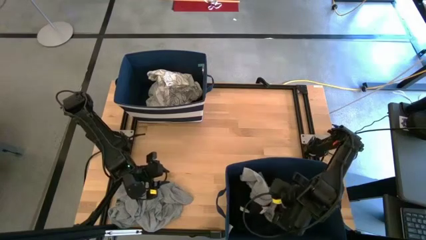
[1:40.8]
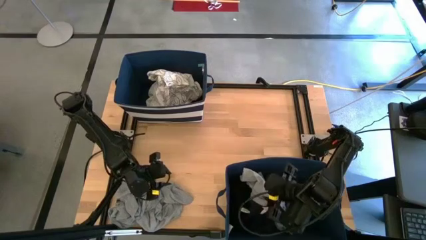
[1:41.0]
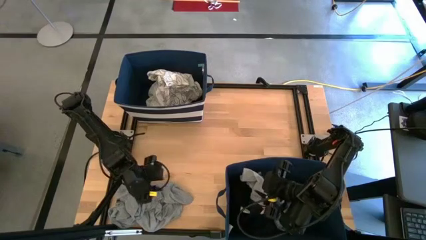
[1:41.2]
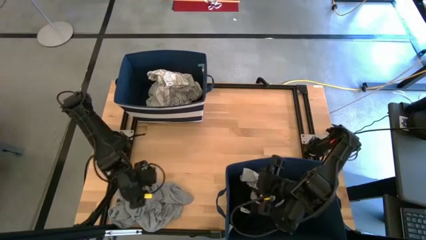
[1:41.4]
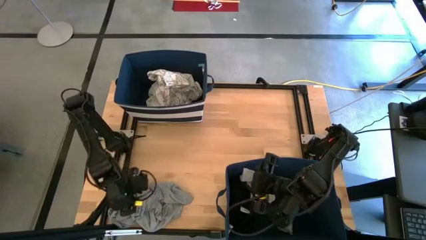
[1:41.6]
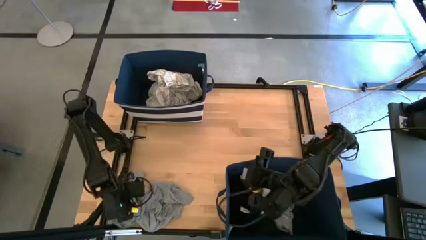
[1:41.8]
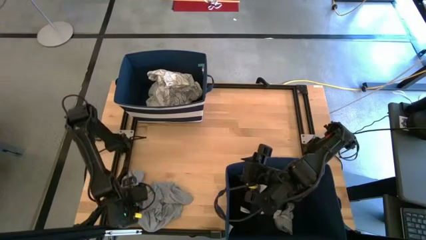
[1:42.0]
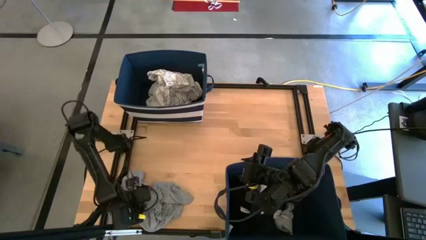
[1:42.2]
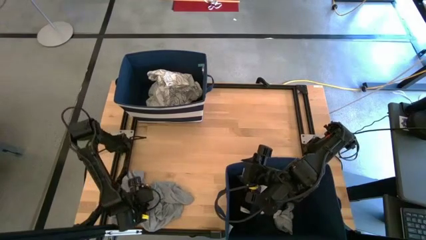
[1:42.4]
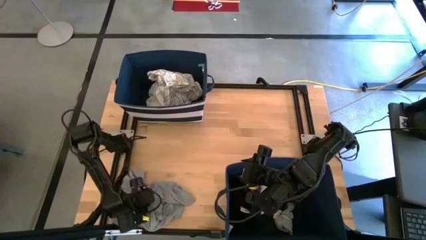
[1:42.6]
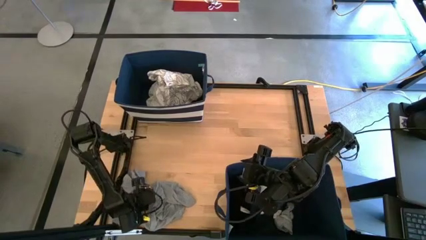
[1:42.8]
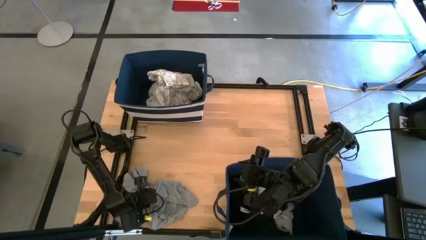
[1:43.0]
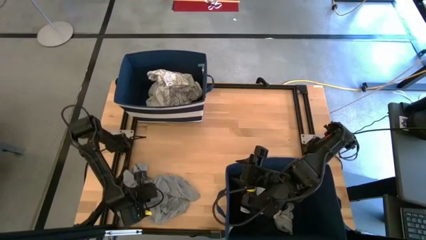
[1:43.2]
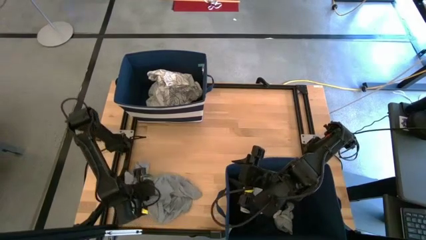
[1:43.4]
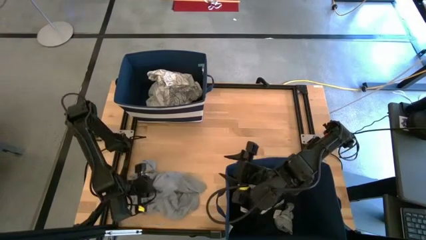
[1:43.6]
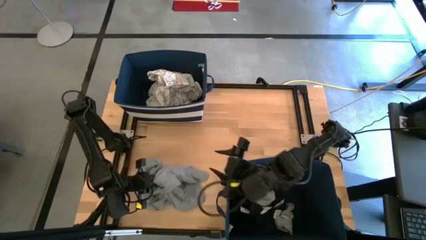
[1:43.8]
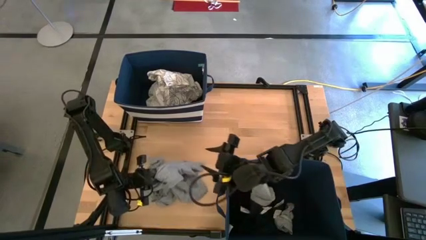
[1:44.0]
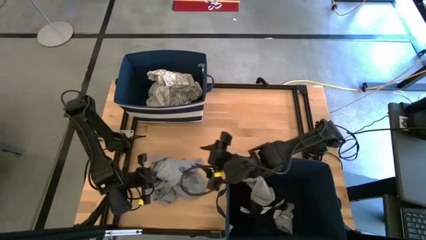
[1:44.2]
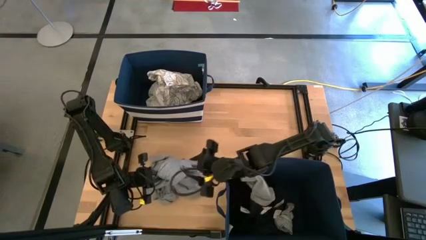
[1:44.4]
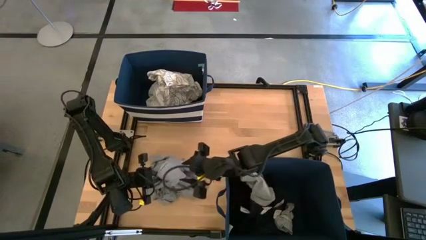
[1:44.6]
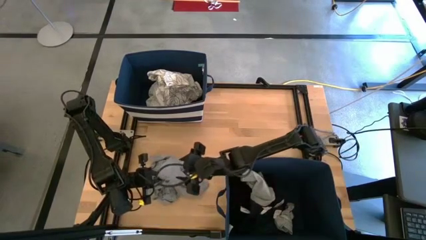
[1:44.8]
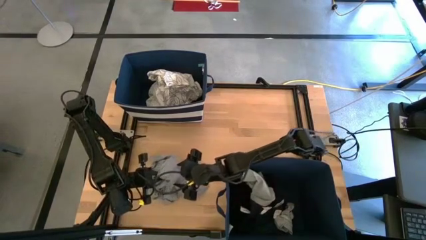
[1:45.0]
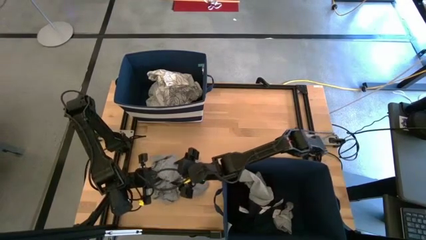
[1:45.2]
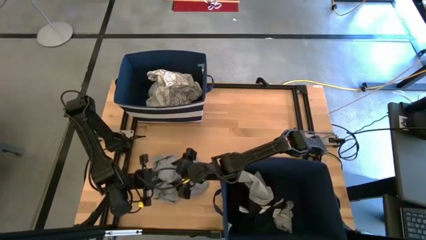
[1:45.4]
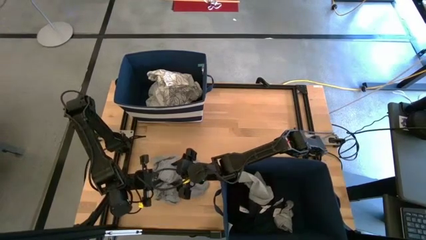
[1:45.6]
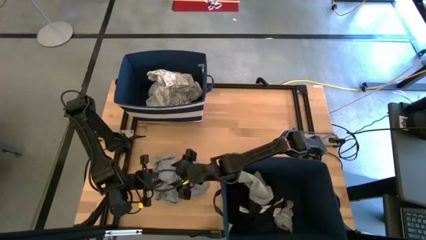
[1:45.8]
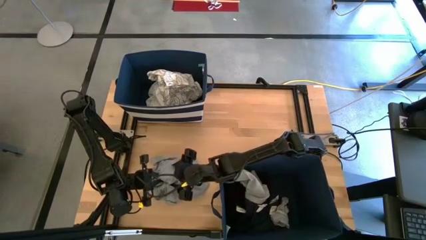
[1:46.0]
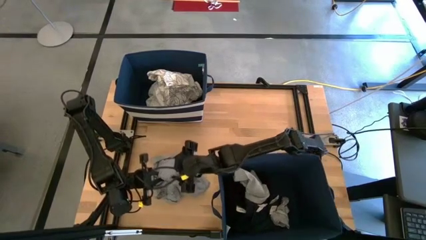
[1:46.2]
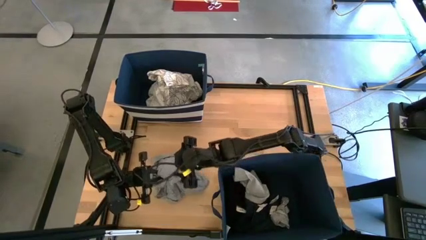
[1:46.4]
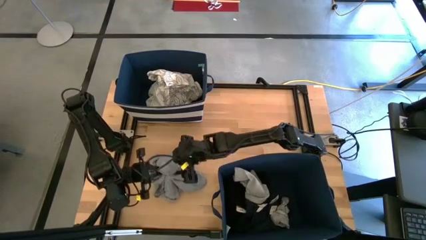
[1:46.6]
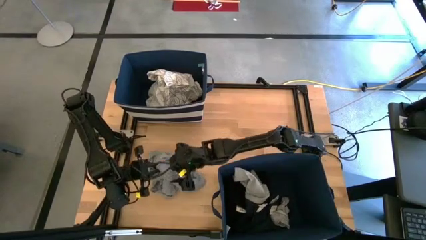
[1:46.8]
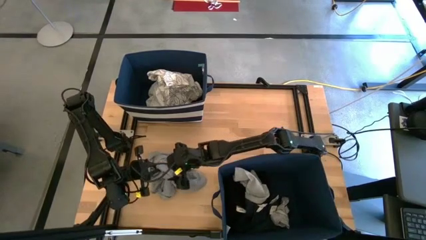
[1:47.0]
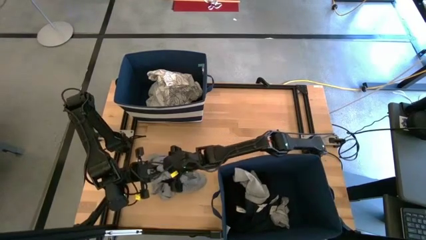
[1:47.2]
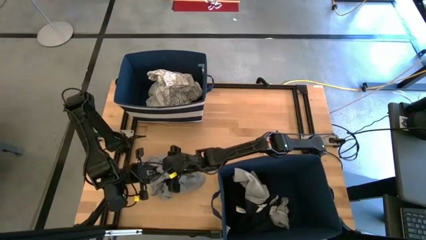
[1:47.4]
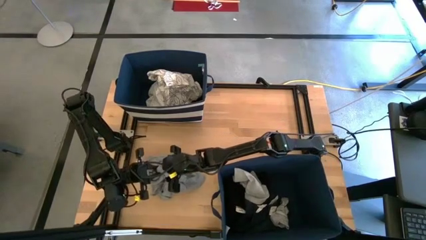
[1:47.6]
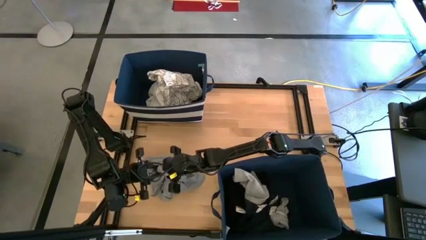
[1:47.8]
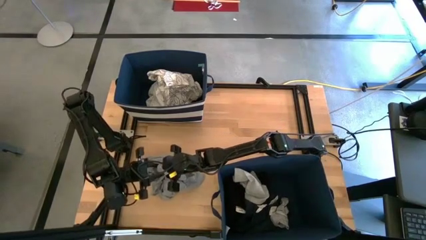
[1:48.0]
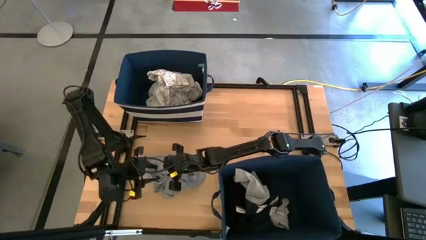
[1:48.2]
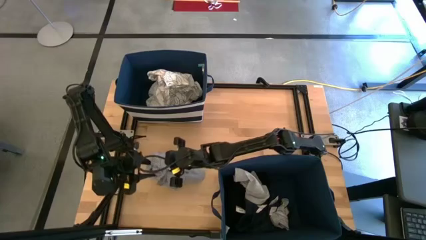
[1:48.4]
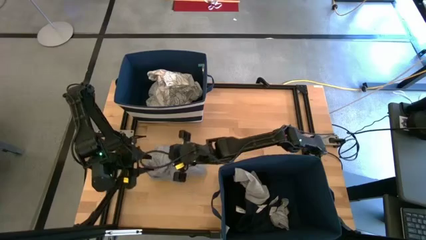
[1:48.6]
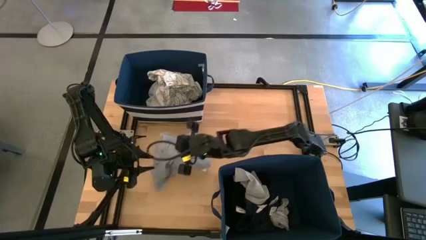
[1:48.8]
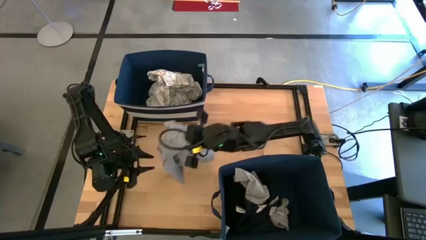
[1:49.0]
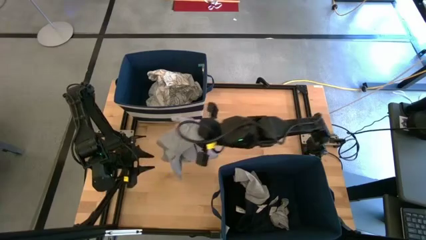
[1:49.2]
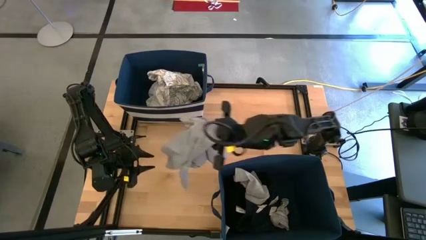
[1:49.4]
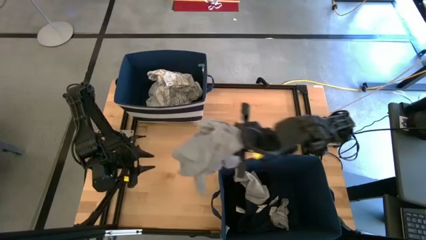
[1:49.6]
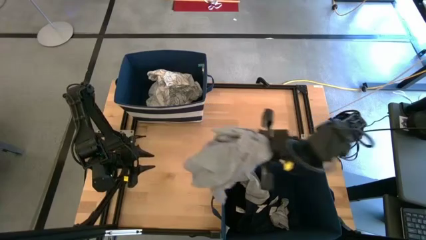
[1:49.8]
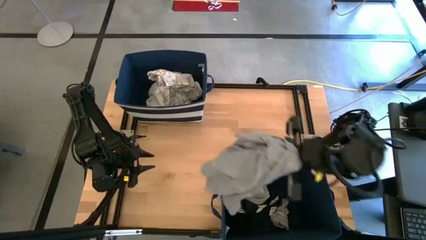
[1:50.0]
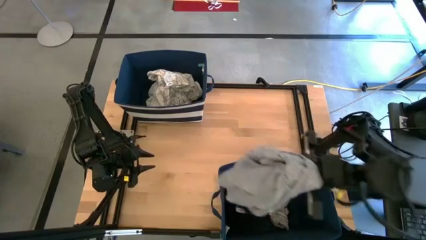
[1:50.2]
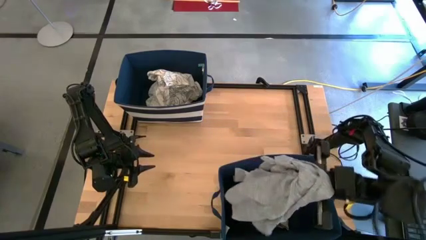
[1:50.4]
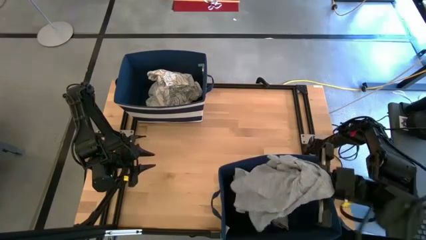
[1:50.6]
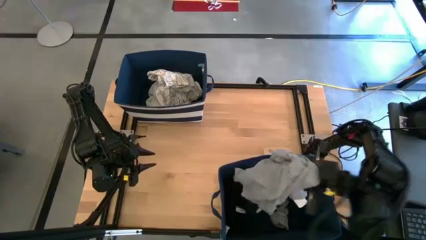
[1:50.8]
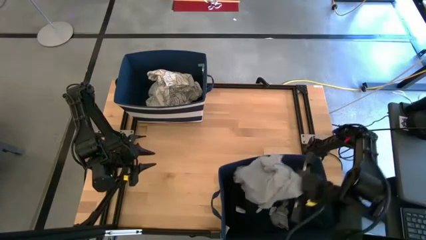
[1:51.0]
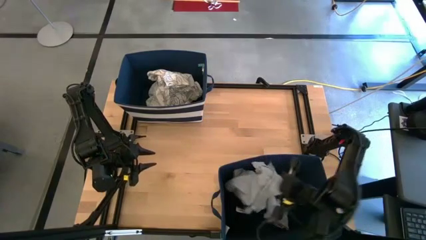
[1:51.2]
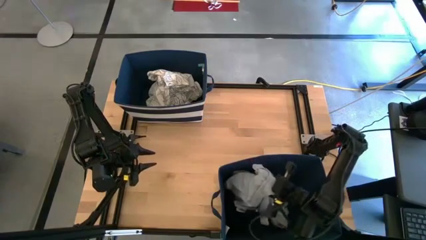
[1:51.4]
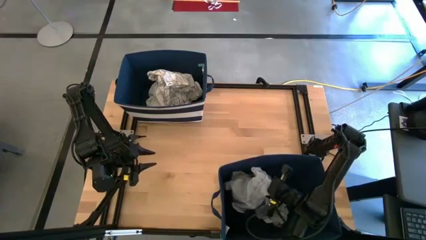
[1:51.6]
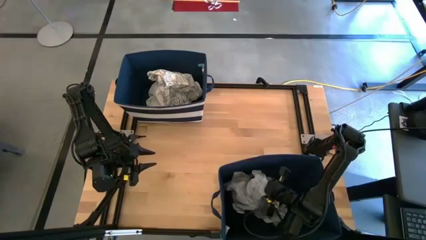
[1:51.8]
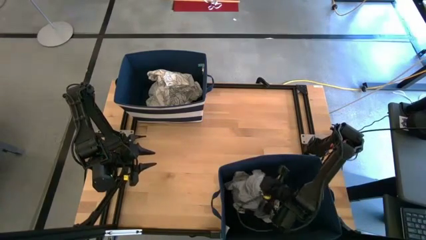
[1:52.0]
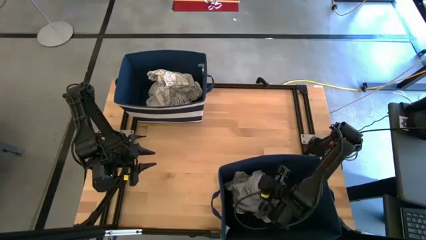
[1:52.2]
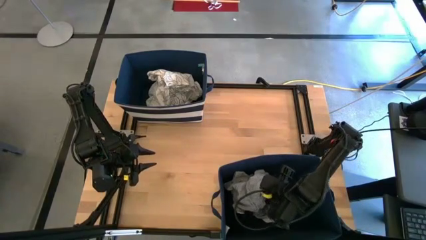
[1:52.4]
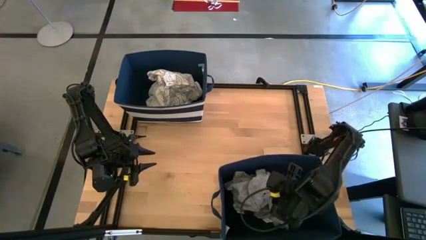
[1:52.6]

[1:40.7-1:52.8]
Task: Sort clothes
Put the gray shirt into the bottom blue laundry organizer

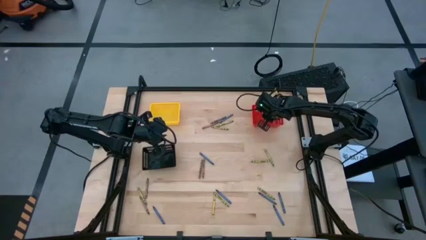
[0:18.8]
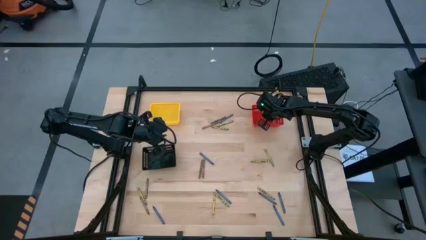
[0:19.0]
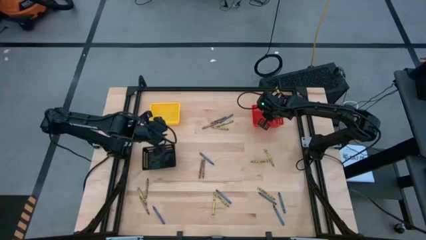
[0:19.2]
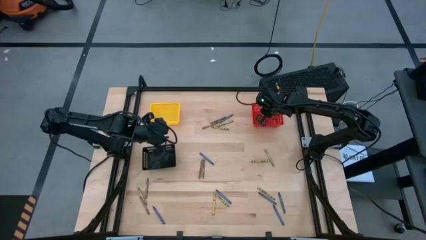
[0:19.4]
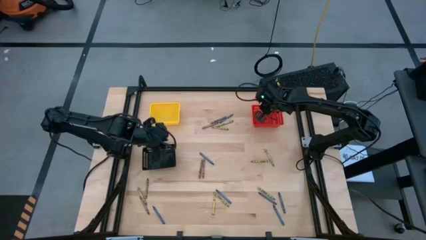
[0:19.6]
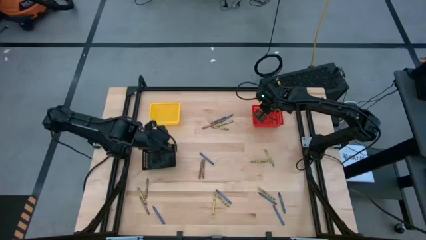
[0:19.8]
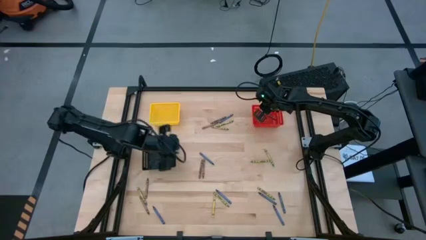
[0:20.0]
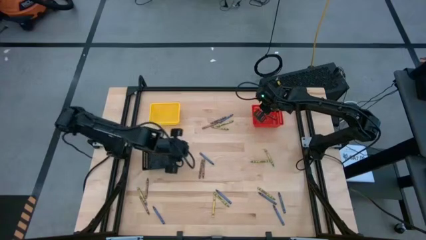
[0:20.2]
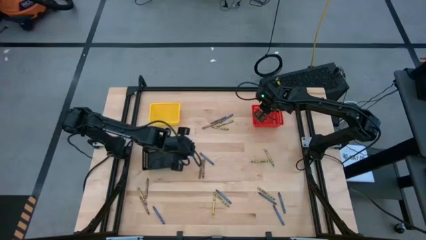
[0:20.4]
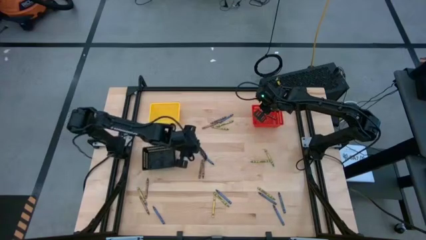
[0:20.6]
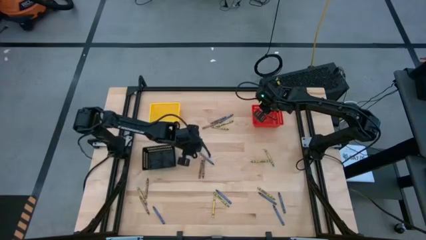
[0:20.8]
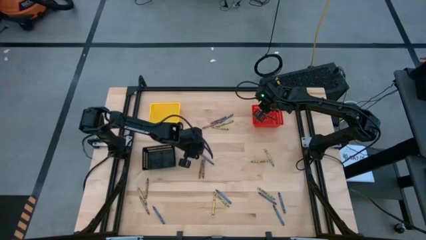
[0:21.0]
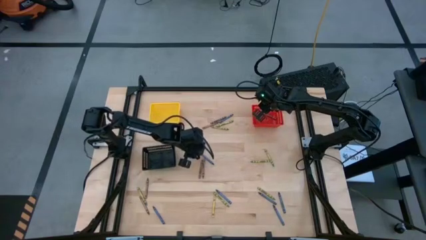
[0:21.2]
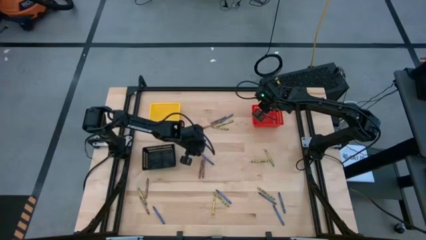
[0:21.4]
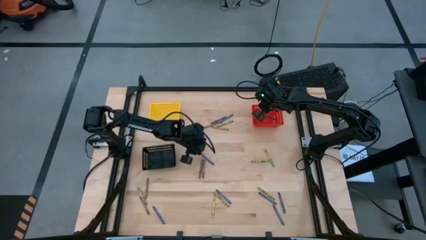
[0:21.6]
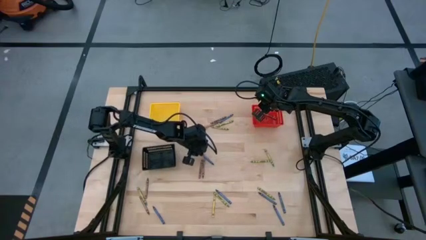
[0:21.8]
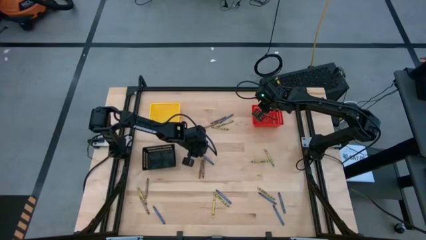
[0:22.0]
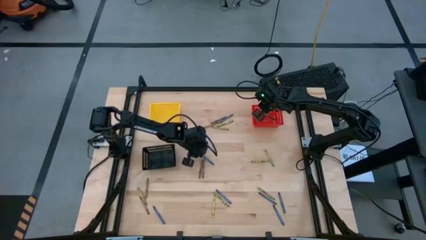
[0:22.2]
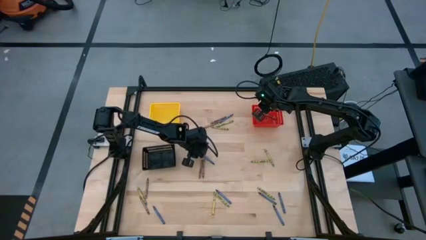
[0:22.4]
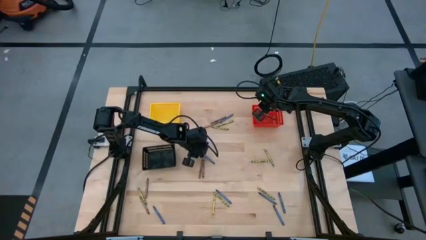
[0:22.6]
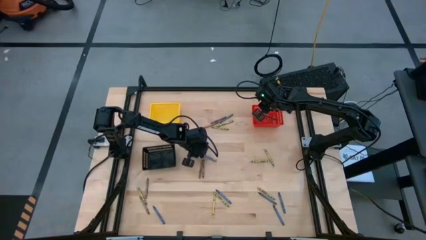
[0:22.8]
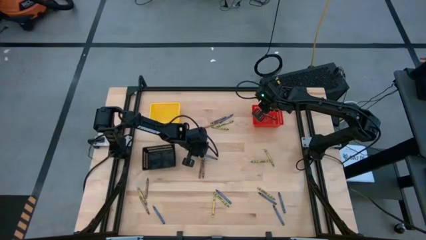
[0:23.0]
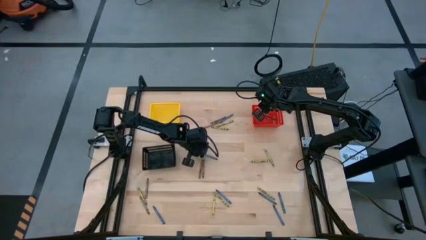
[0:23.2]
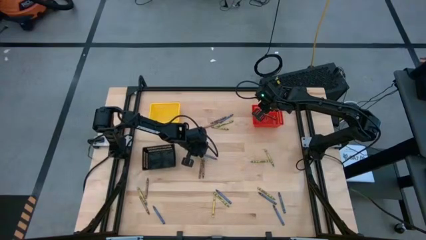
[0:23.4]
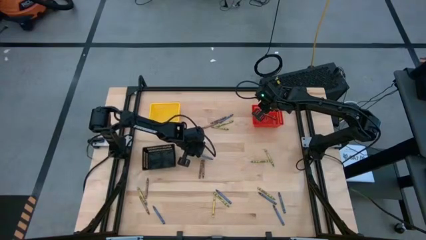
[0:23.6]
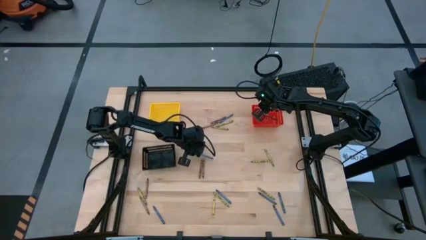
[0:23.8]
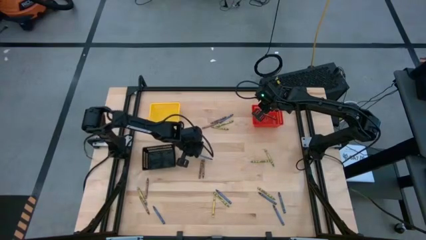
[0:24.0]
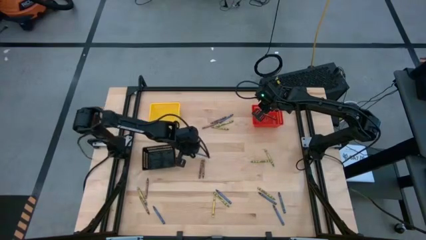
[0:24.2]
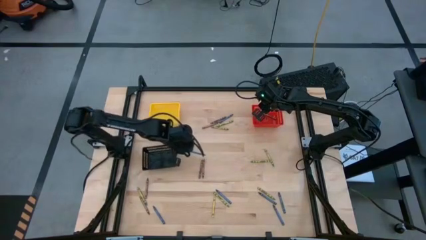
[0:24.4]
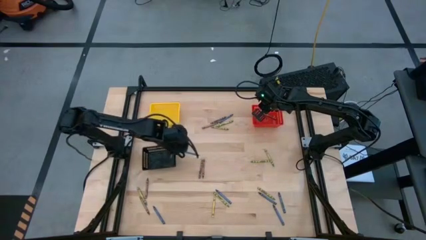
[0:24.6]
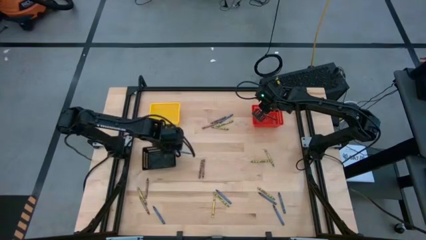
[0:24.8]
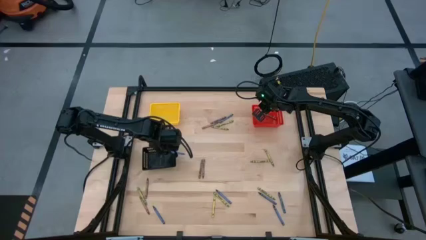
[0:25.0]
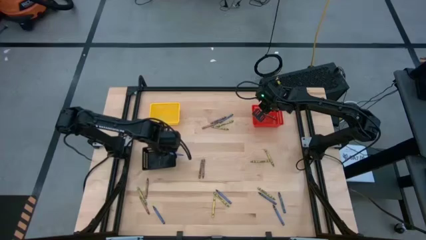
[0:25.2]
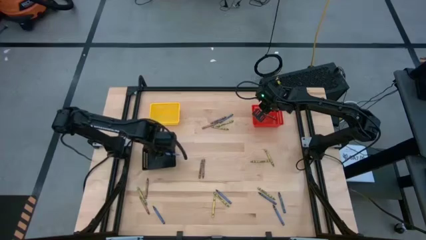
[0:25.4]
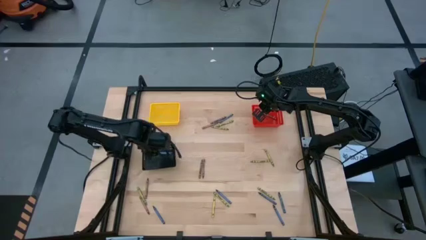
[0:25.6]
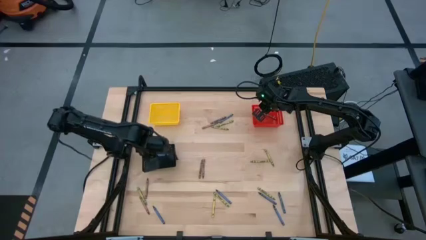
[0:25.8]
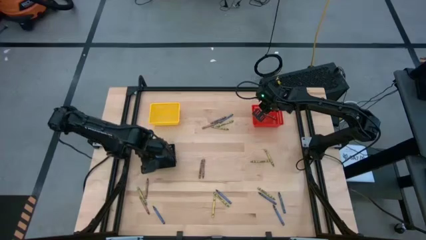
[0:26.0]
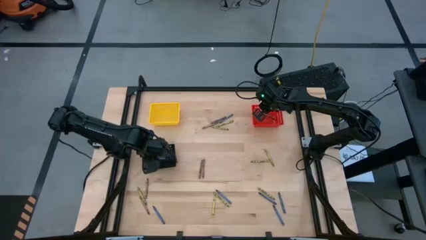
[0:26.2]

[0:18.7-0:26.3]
Task: Sort crayons
Put the blue crayon into the black bin
